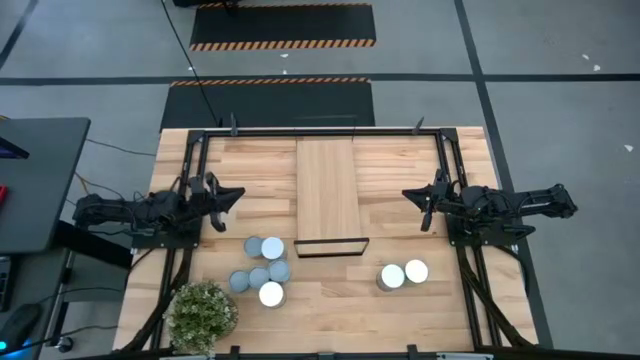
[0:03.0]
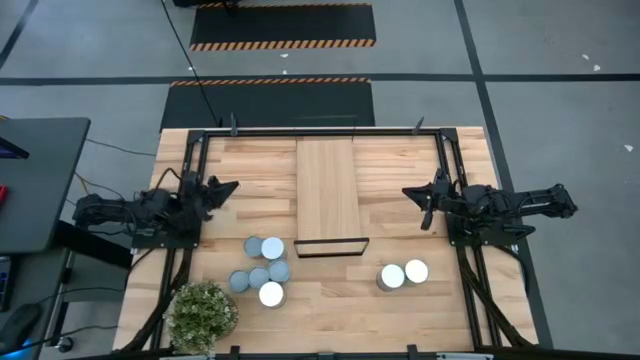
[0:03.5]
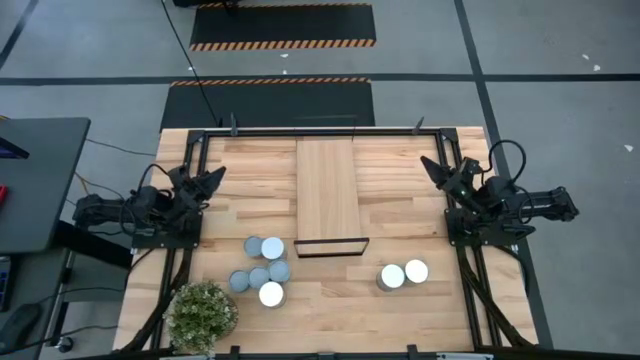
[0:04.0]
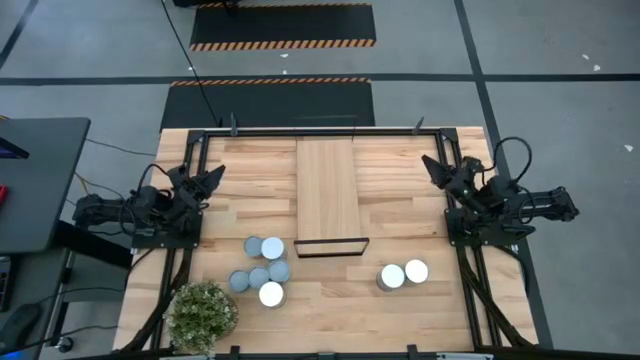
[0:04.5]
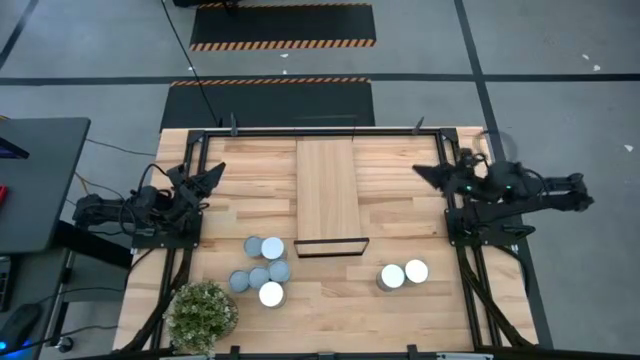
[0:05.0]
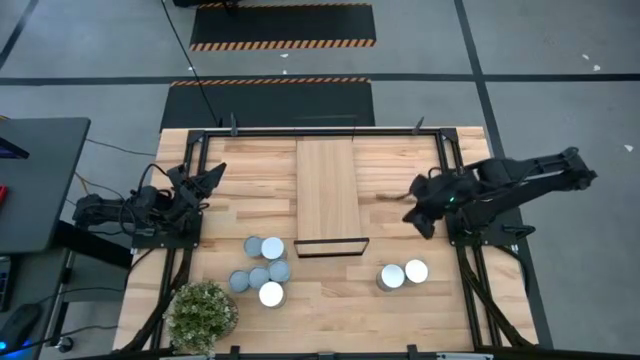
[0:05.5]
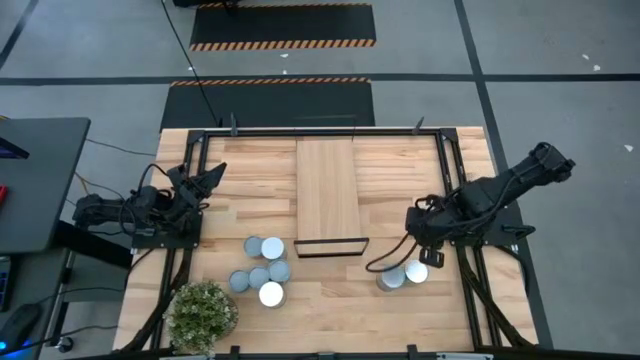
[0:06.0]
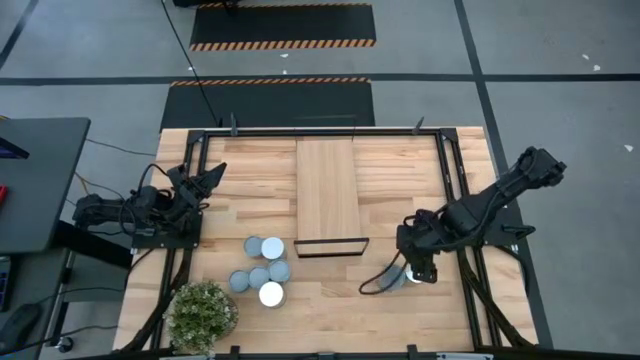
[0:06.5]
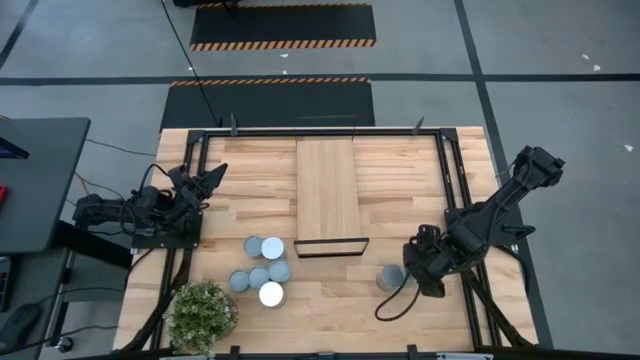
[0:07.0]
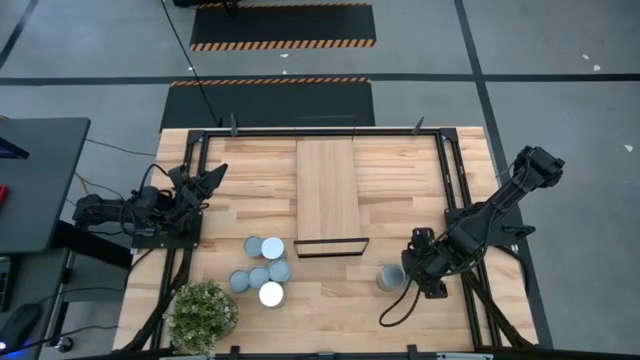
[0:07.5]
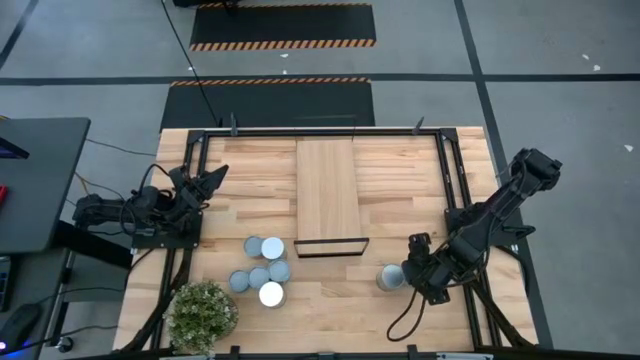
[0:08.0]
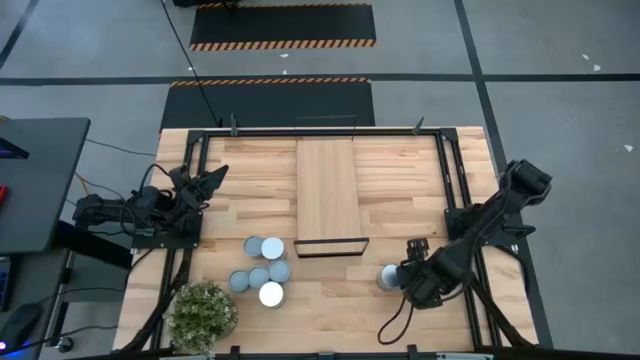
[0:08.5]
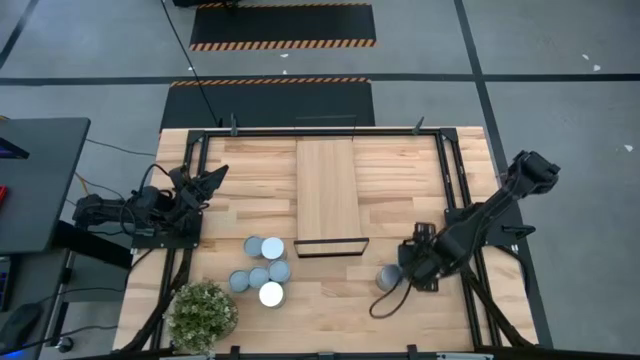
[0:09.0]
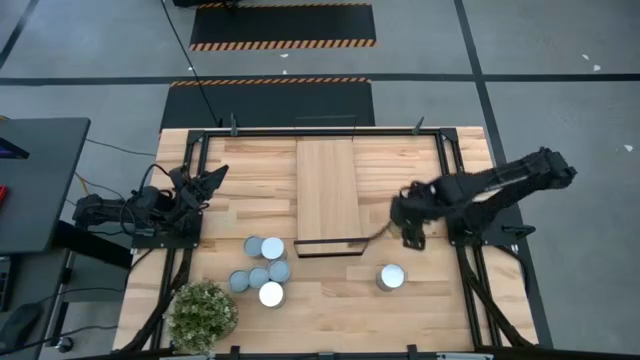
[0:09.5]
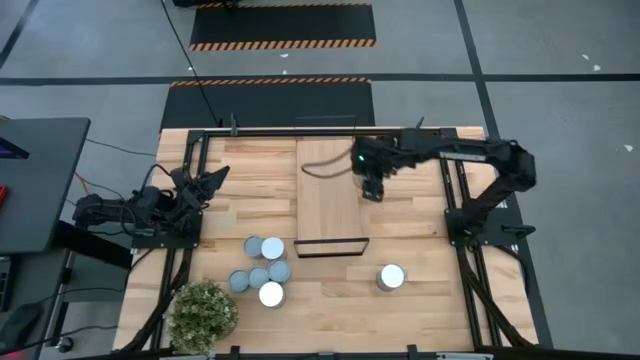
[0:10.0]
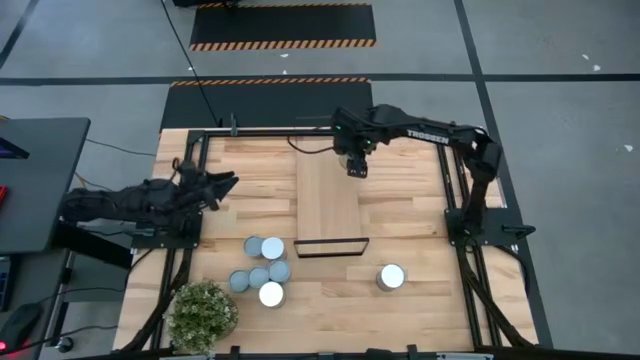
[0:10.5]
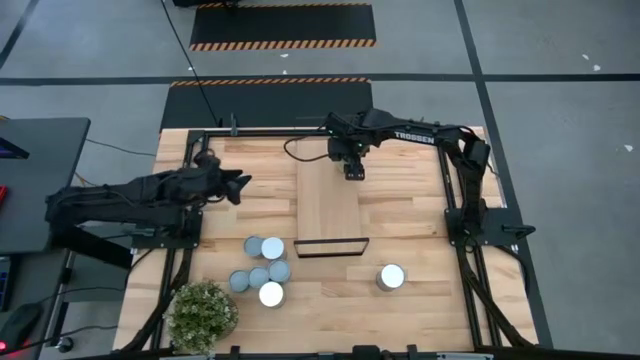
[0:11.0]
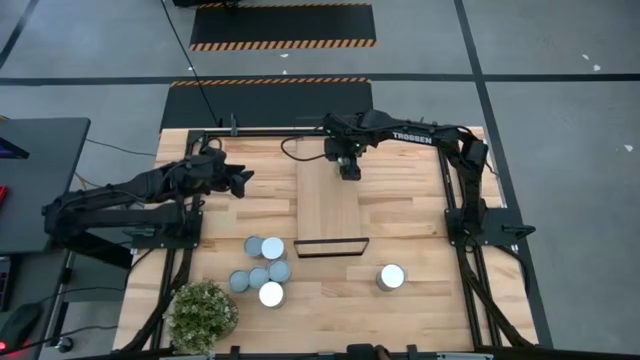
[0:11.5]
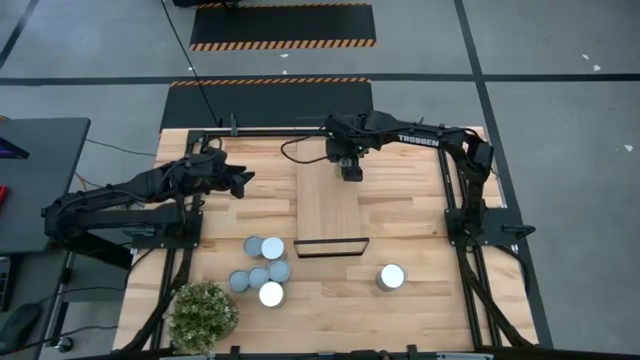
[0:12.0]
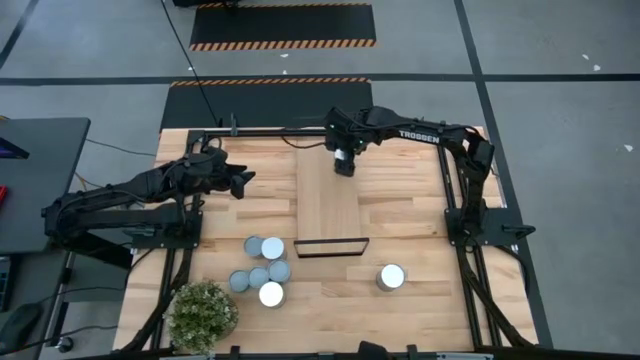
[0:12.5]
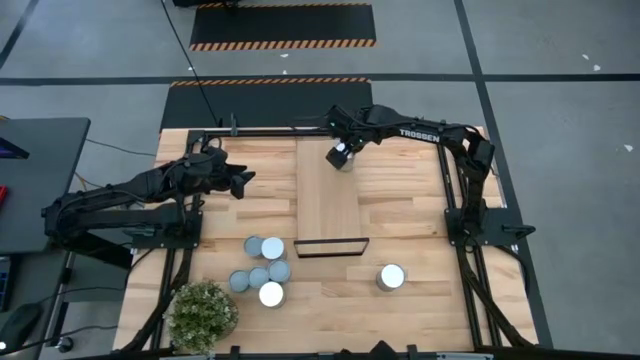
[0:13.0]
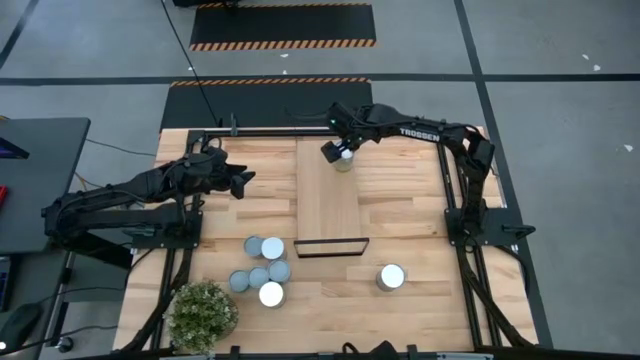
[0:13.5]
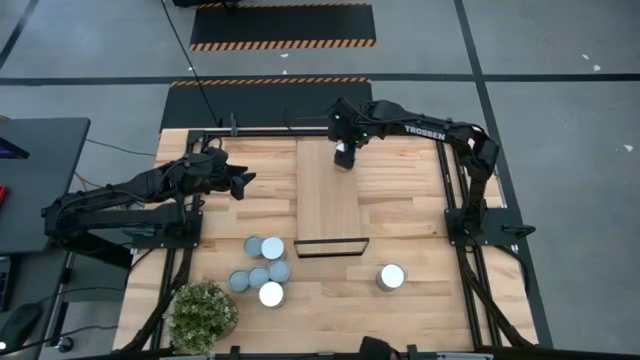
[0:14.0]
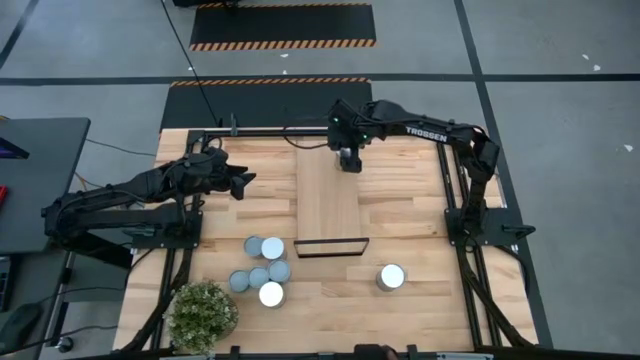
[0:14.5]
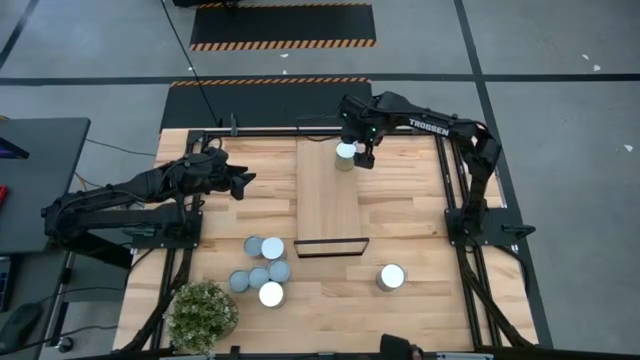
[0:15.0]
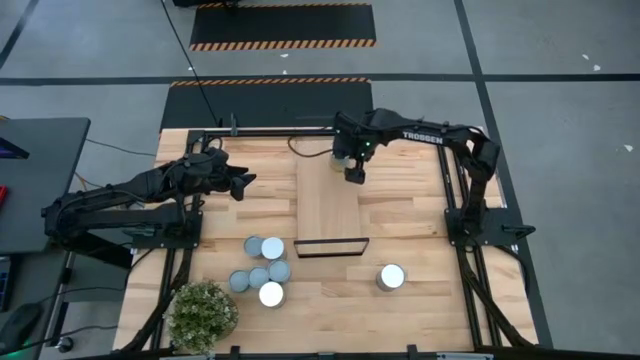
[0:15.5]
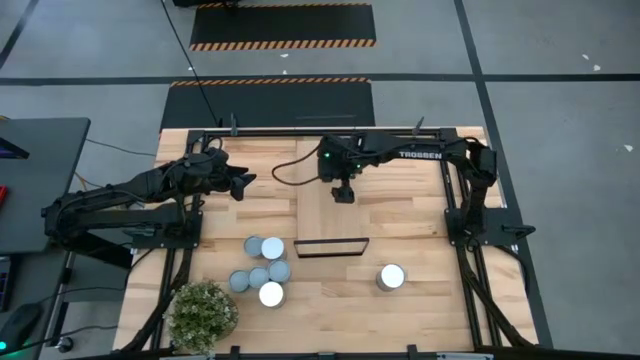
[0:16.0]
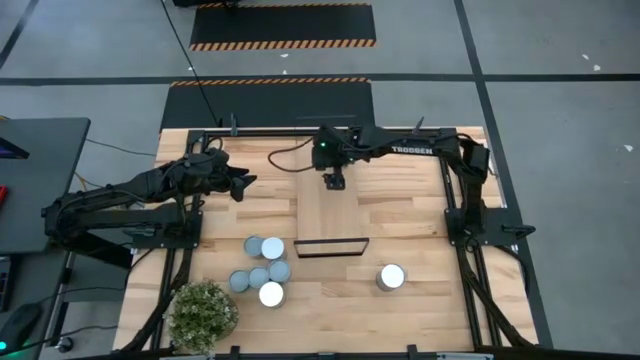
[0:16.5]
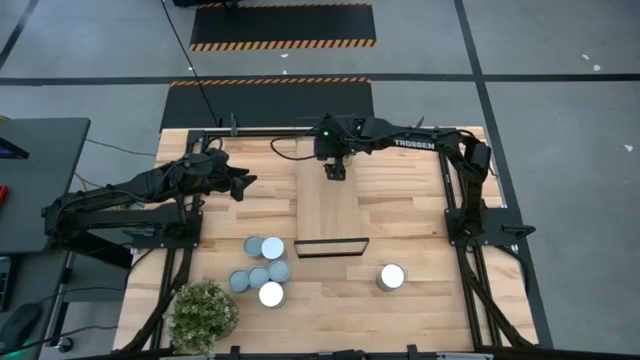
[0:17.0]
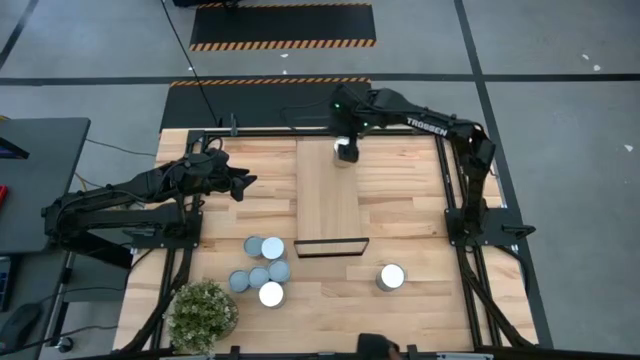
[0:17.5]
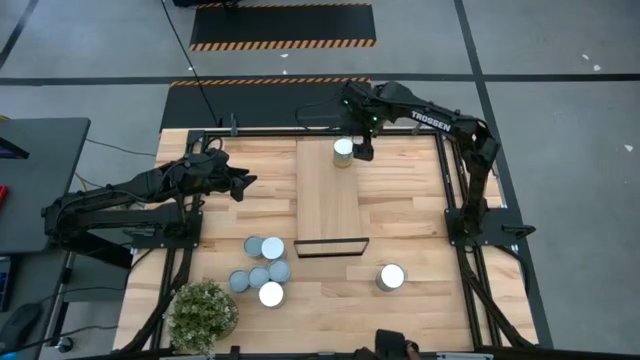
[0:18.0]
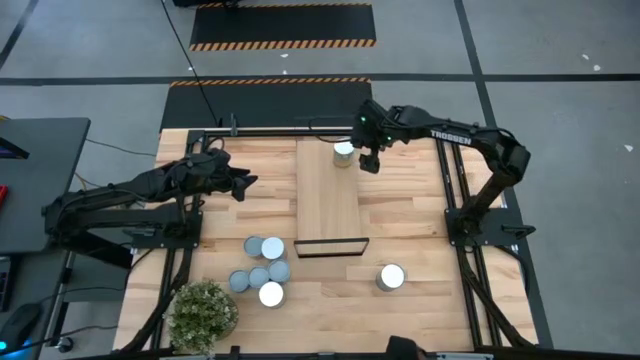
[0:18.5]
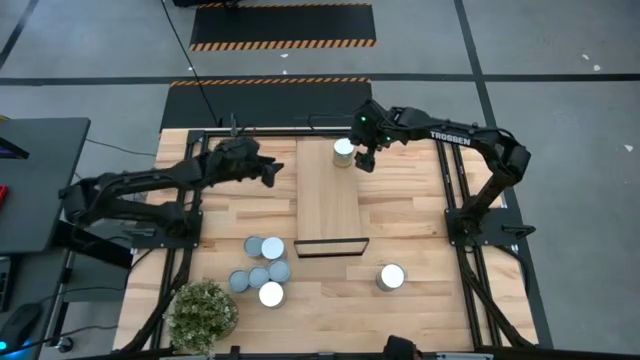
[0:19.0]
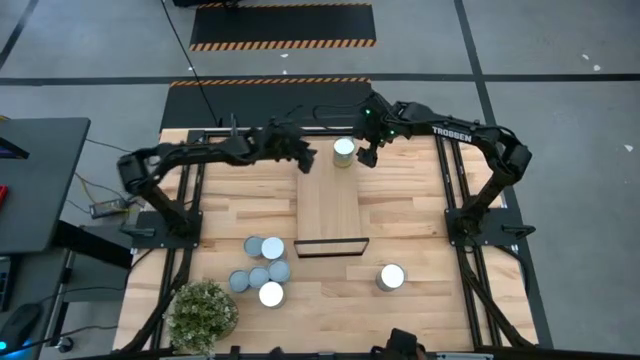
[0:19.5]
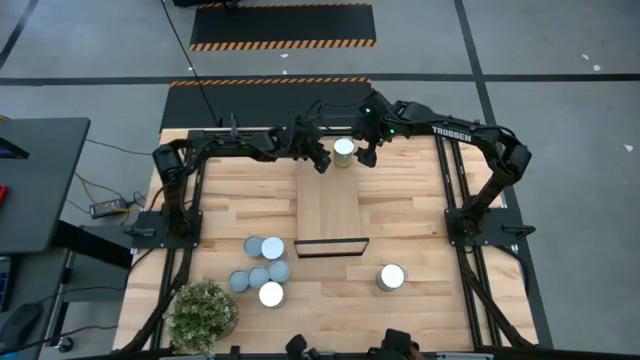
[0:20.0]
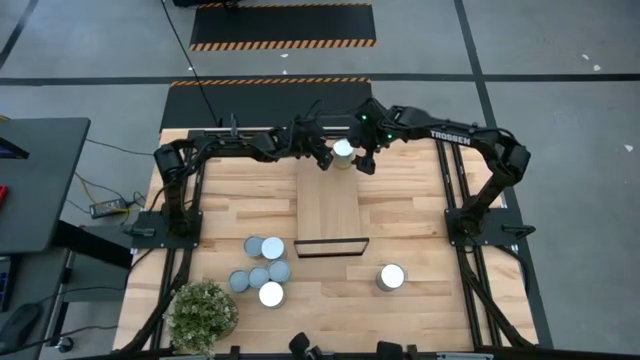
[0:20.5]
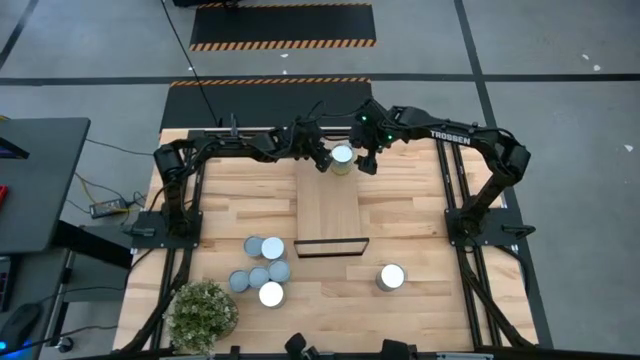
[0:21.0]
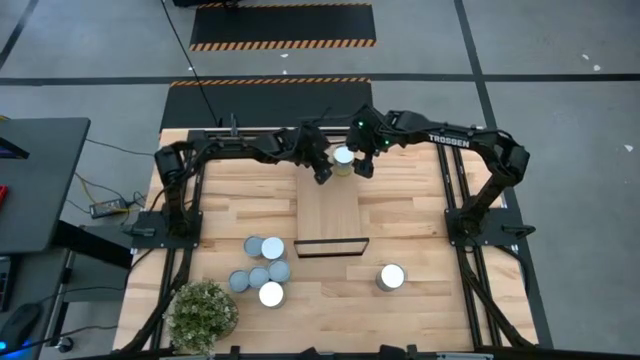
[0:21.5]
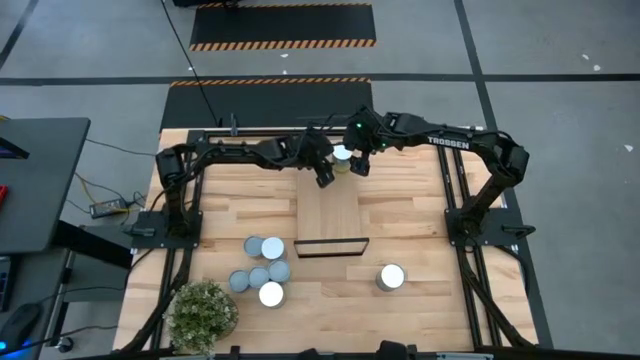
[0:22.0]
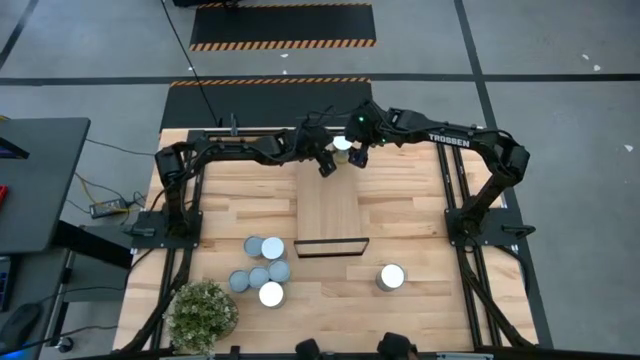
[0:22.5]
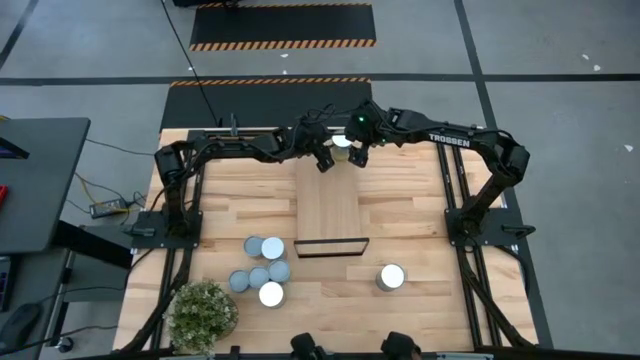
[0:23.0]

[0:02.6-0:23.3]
Task: Pick and place cans onto a shelf
Put the canned carrots on the shelf
